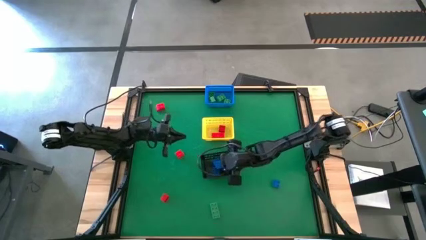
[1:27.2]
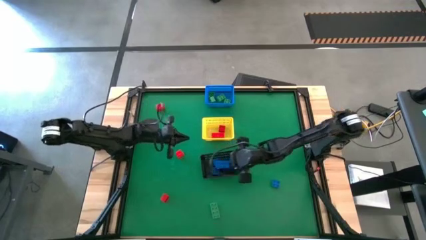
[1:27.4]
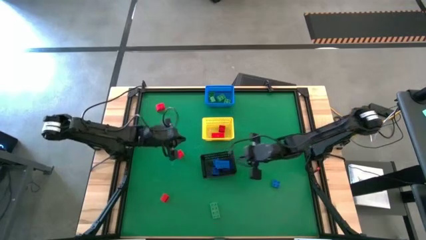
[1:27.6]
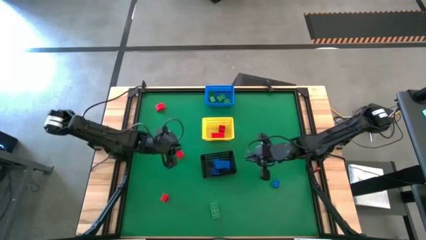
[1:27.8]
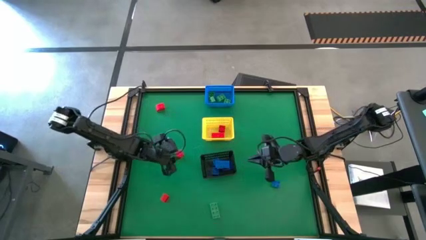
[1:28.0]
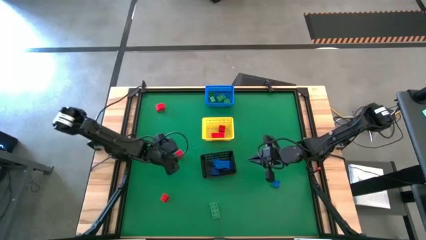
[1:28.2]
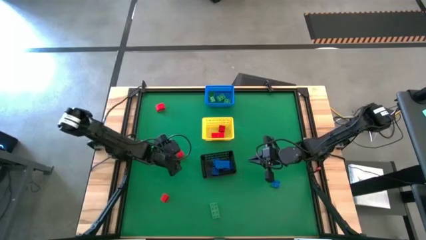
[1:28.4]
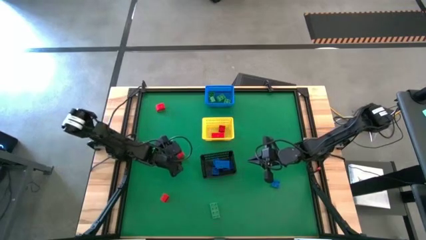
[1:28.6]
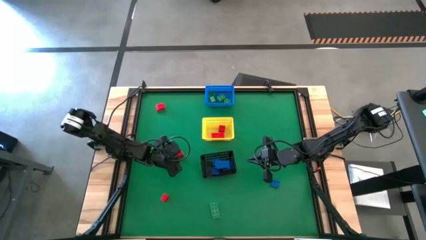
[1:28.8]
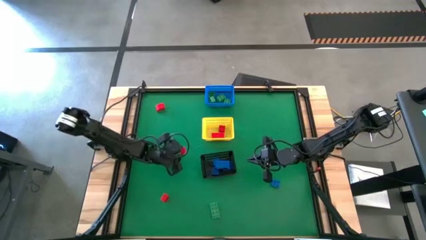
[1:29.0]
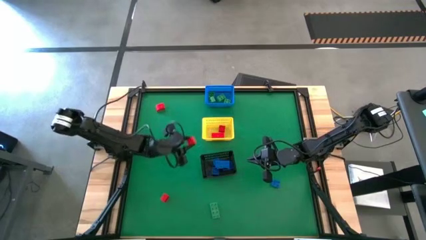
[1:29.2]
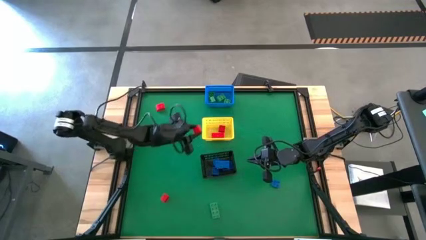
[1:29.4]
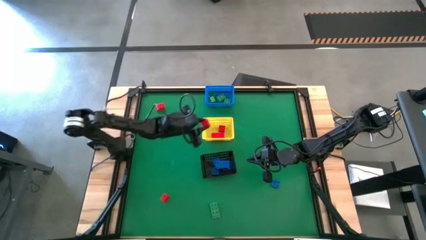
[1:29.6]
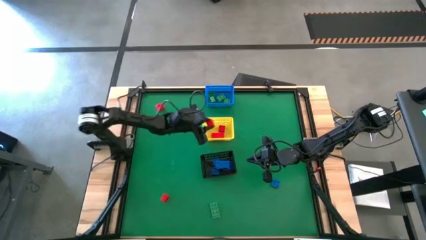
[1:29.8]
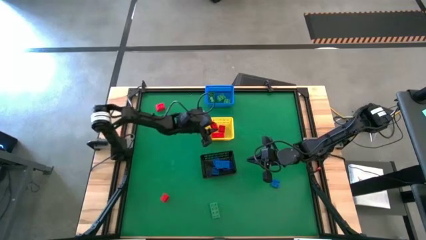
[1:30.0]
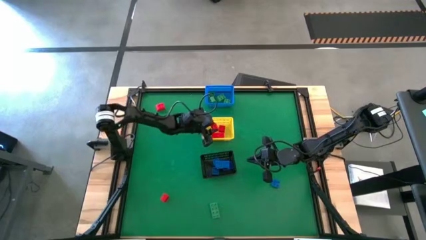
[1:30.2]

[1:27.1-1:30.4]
Task: Sort & place blocks by color
Put the red game piece into the yellow bin

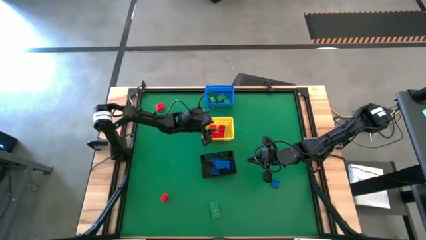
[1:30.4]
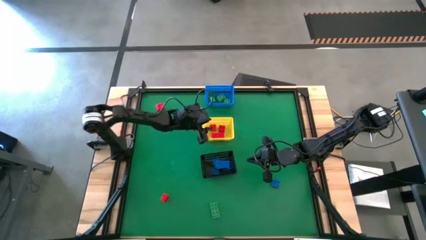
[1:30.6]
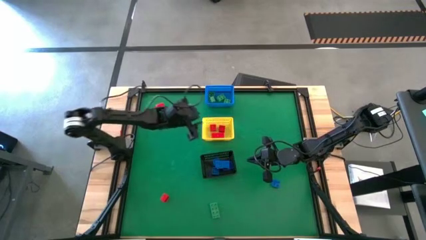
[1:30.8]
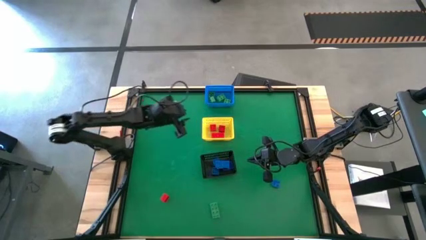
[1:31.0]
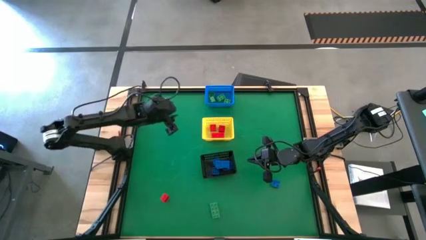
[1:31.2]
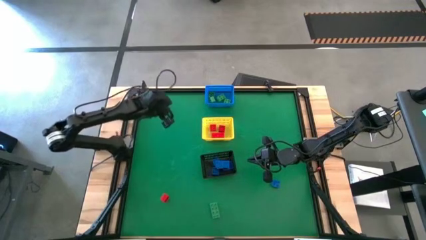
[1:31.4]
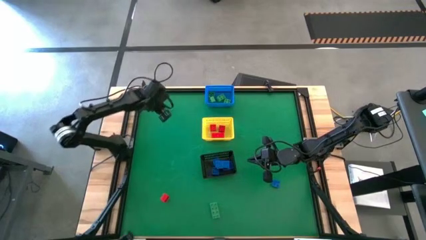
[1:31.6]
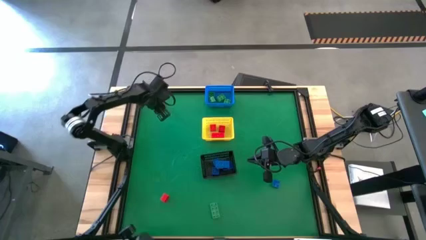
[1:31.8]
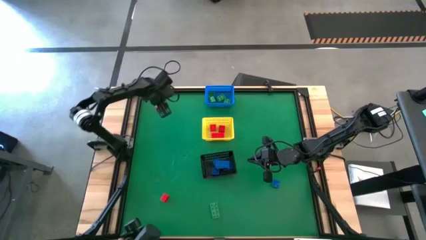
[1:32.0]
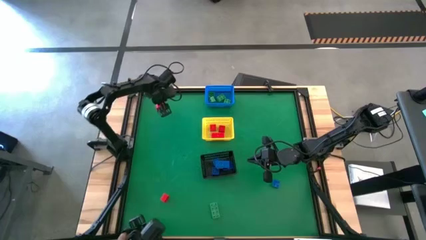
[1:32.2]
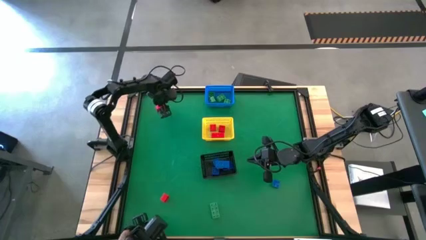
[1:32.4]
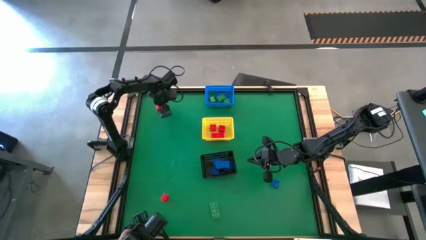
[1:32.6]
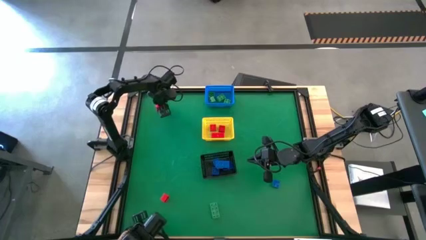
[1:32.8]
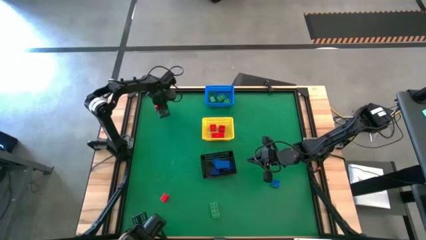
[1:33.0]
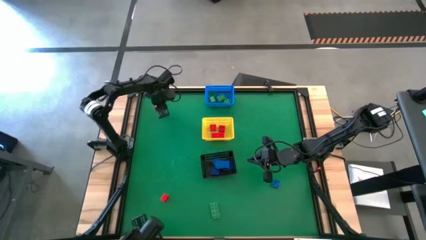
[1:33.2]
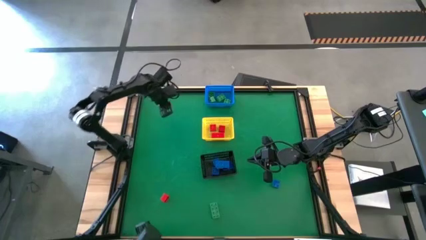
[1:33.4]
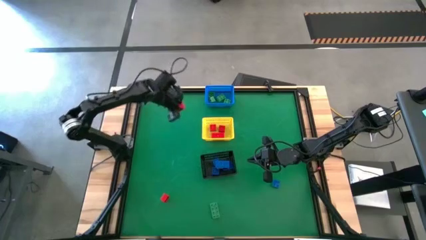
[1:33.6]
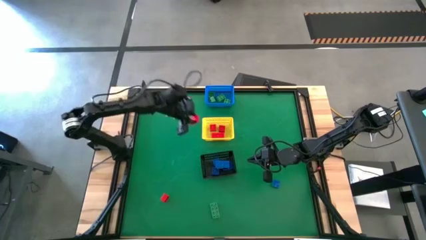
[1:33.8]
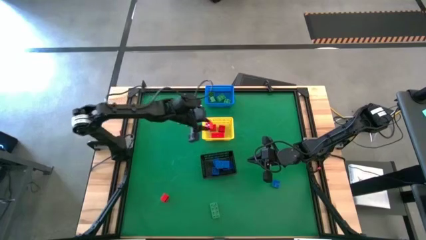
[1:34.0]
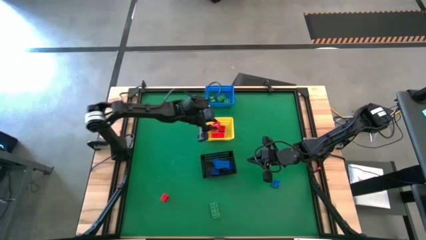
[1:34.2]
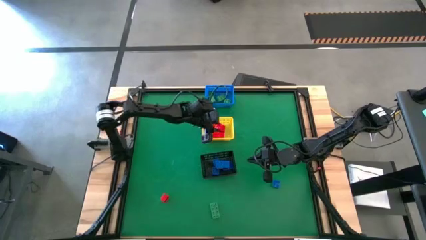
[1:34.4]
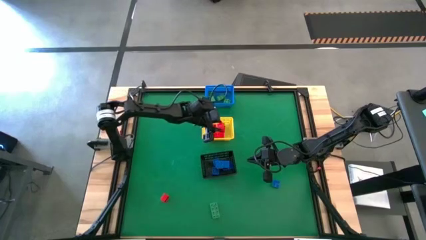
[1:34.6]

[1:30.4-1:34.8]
Put the red game piece into the yellow bin

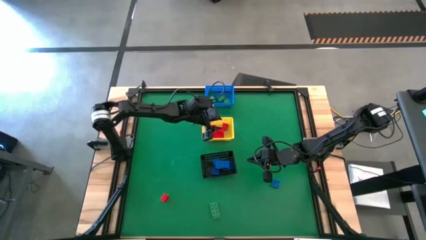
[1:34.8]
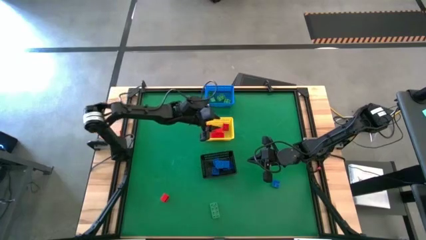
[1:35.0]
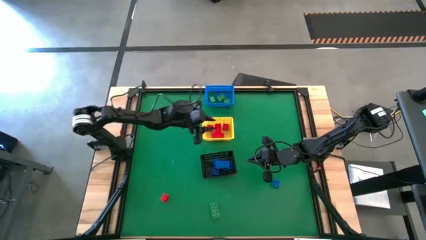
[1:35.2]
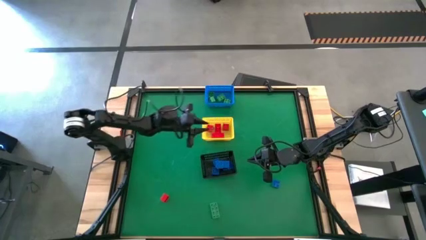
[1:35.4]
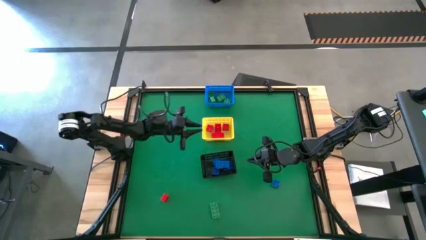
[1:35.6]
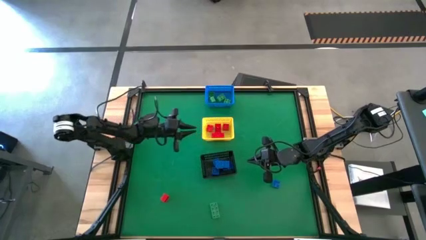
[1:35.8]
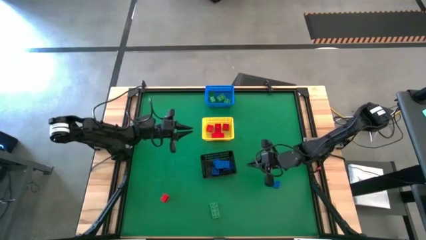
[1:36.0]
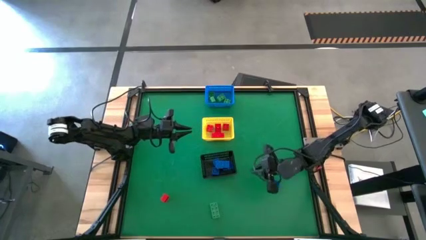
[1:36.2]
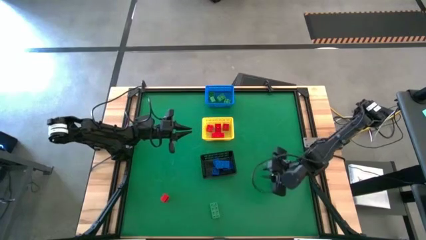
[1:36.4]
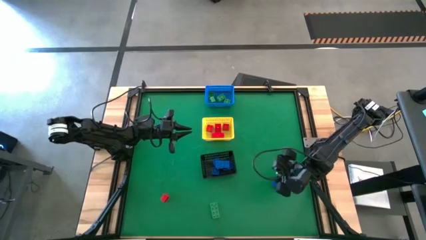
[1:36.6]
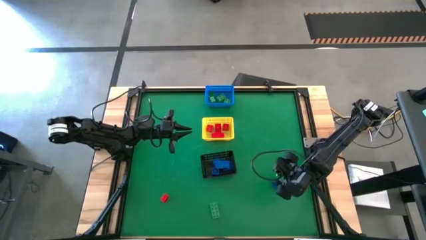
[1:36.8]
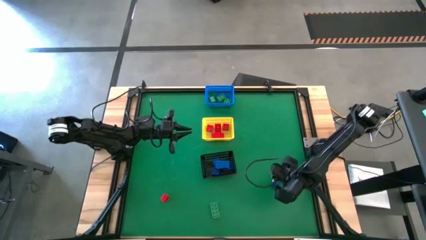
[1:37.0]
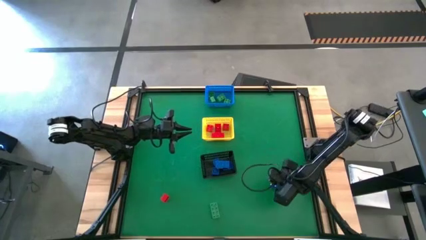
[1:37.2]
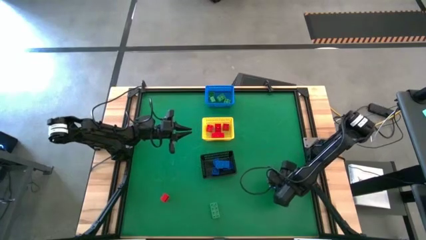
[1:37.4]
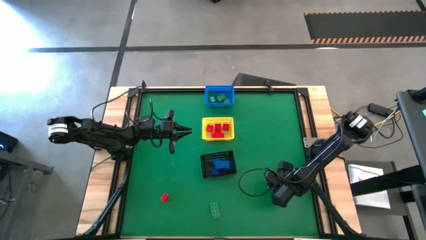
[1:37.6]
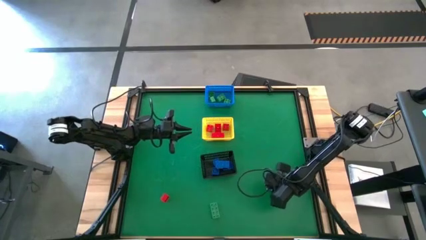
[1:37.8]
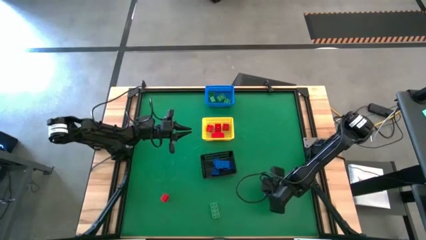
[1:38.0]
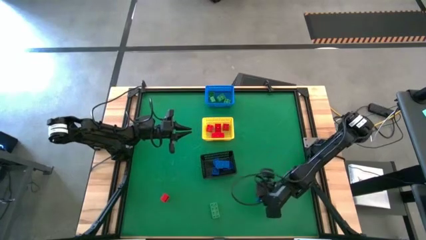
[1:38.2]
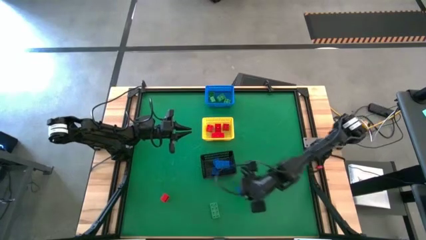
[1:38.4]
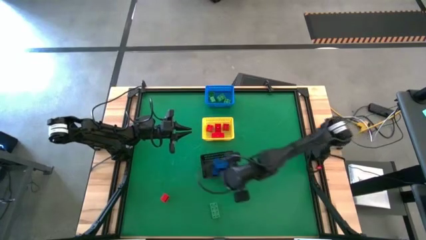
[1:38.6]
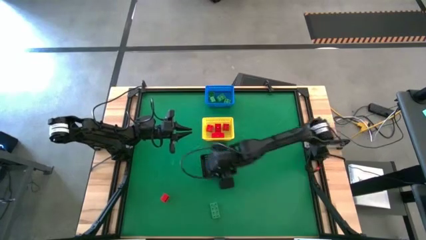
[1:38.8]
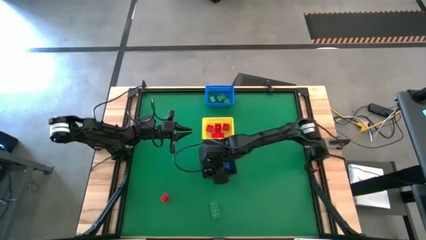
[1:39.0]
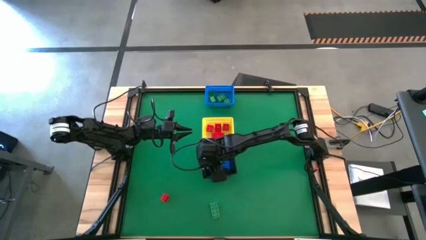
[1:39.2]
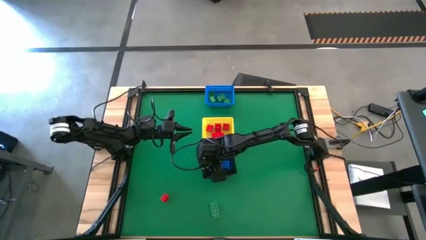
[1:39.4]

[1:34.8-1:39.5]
Put the blue game piece into the black bin

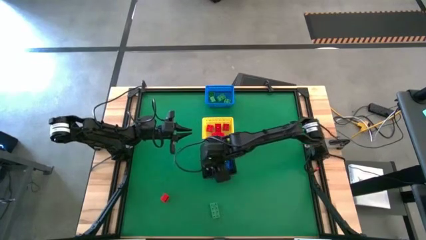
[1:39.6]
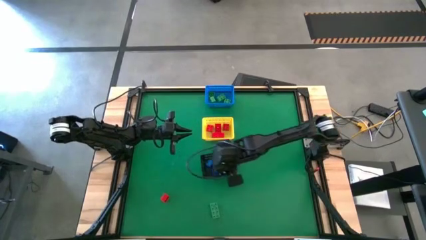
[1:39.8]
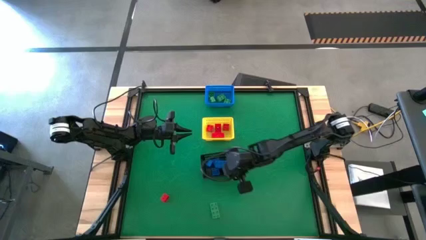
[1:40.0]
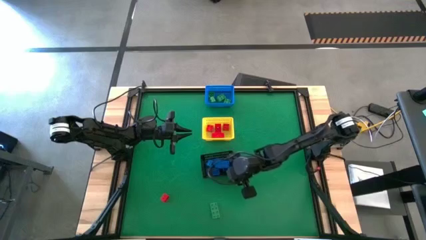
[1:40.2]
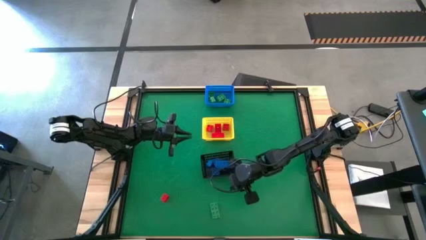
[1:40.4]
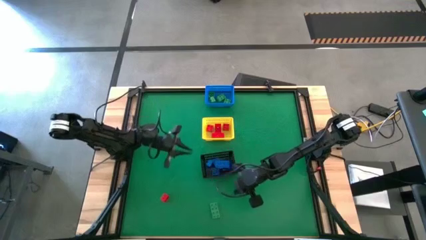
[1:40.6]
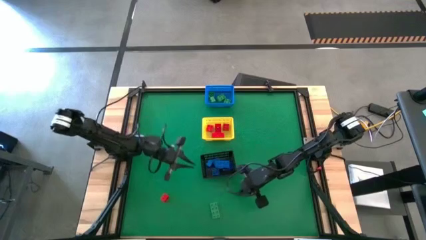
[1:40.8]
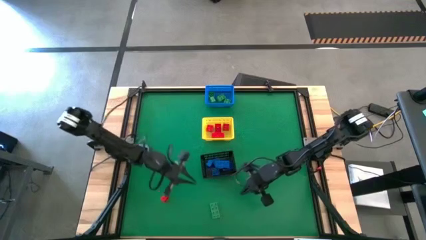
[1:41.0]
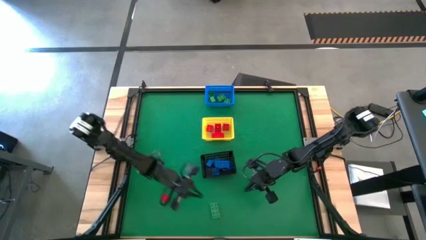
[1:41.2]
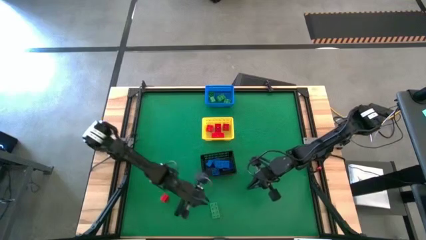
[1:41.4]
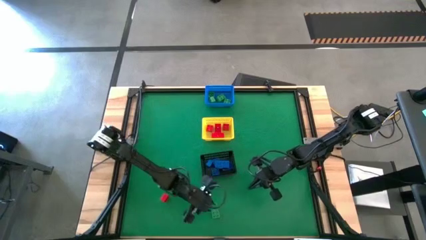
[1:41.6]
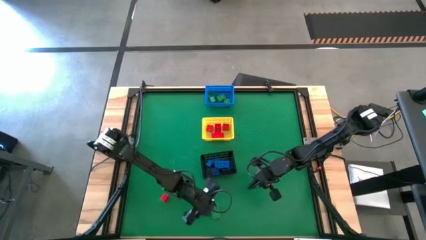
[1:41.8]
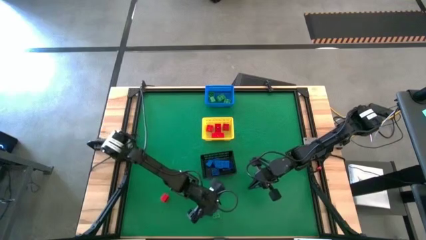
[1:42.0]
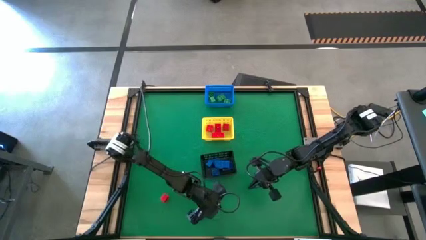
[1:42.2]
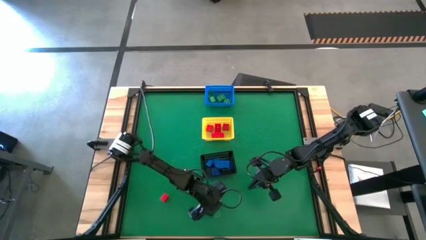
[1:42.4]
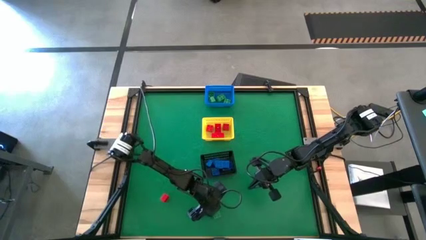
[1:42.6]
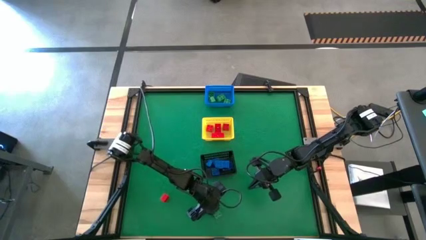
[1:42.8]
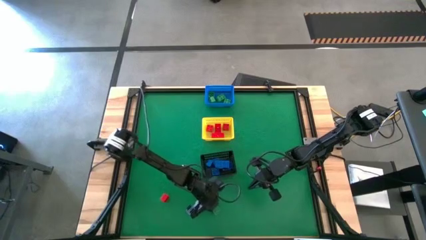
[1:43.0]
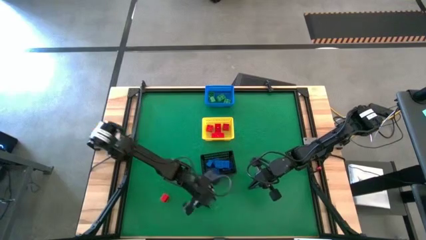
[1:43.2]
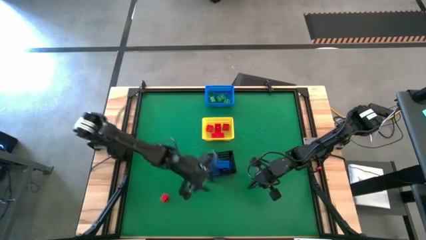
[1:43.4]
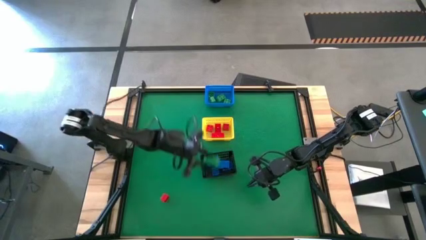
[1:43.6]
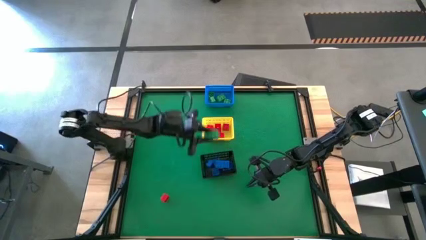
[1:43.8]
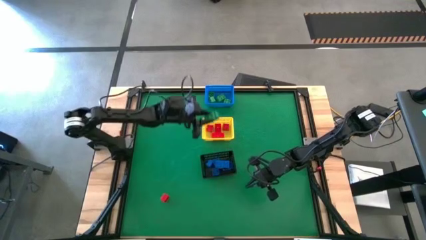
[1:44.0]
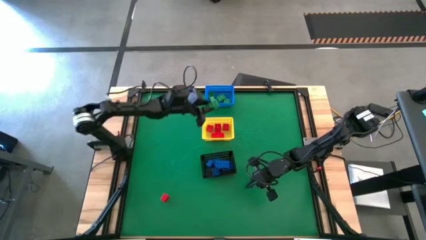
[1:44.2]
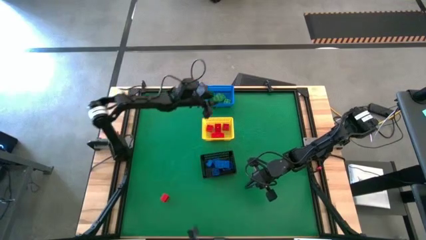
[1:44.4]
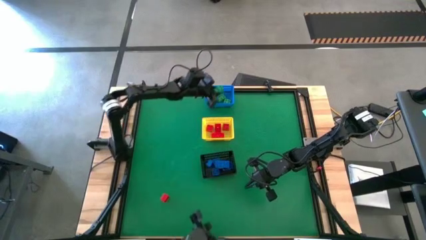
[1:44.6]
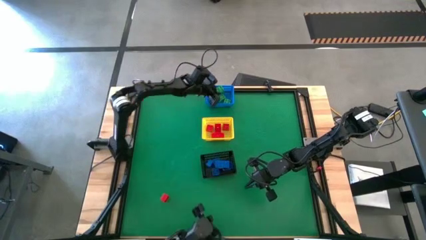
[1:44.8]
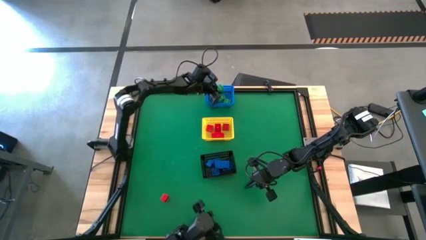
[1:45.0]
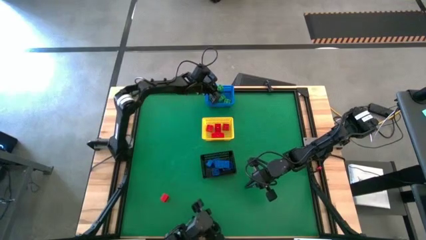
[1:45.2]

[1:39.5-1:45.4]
Put the green game piece into the blue bin
